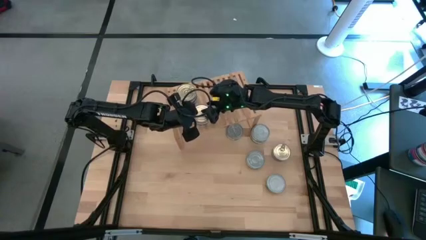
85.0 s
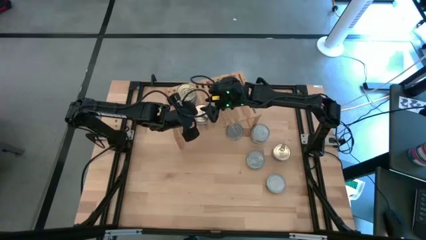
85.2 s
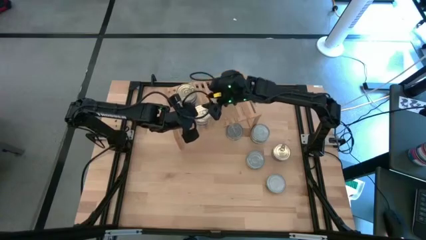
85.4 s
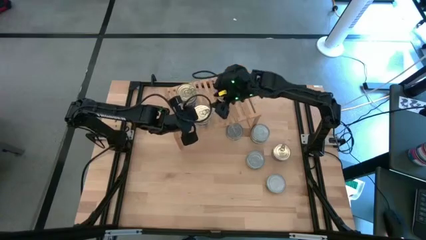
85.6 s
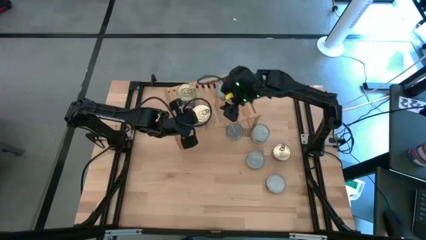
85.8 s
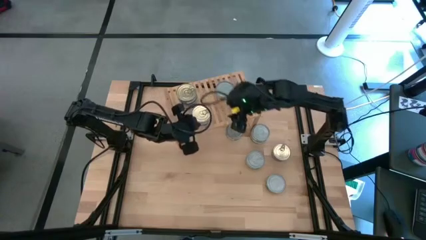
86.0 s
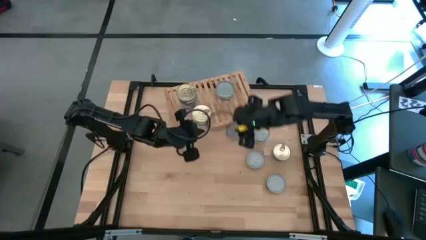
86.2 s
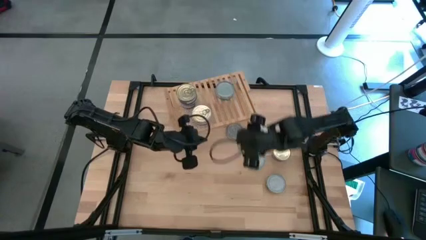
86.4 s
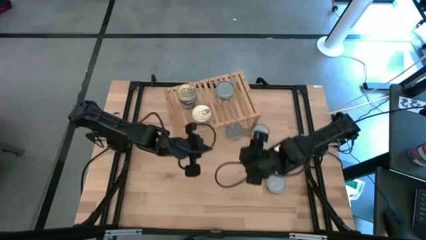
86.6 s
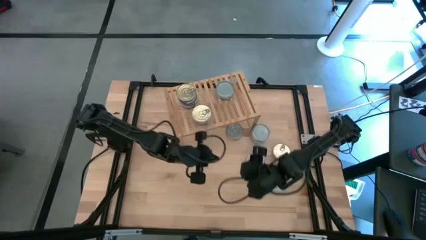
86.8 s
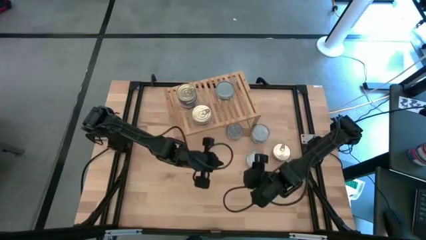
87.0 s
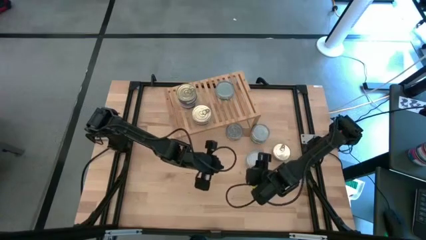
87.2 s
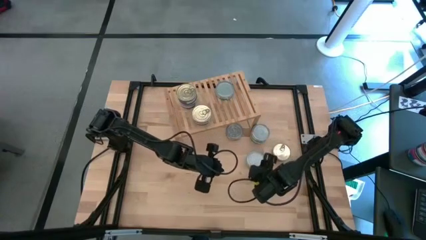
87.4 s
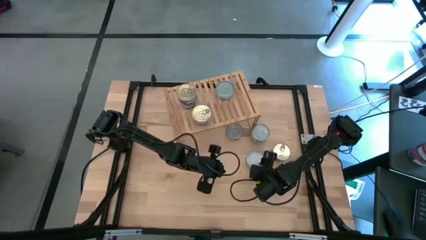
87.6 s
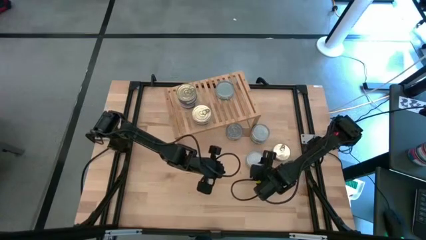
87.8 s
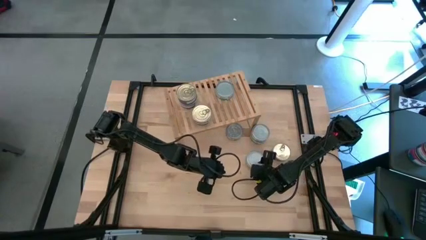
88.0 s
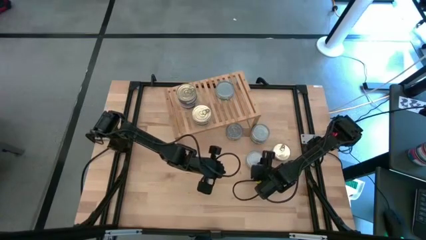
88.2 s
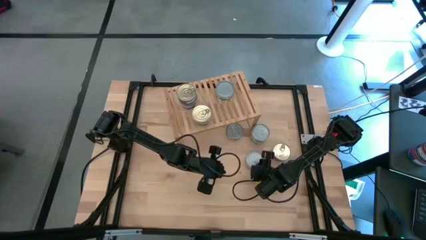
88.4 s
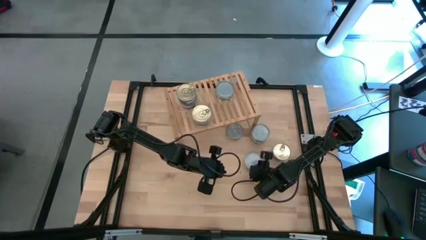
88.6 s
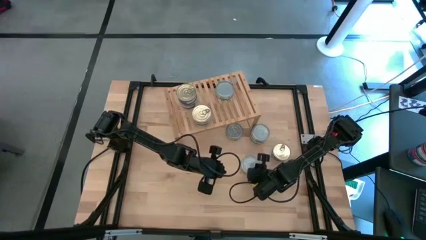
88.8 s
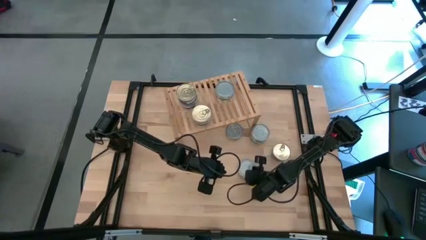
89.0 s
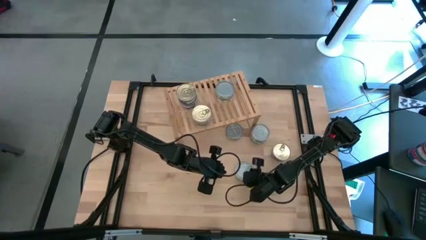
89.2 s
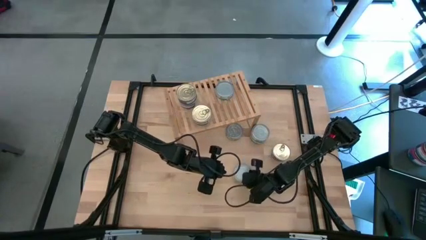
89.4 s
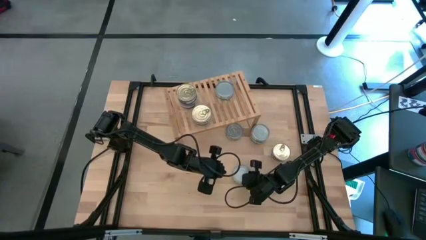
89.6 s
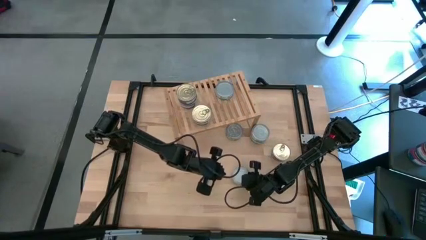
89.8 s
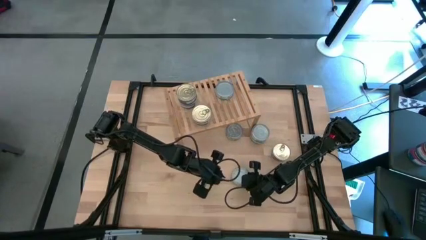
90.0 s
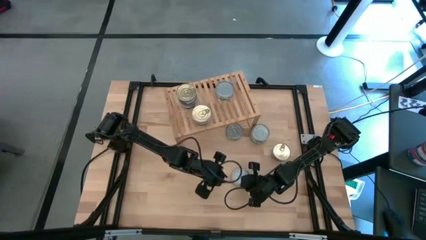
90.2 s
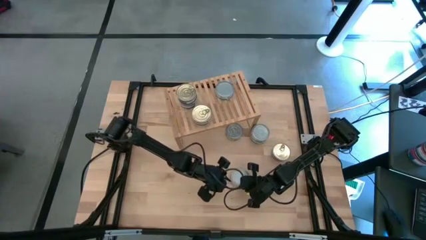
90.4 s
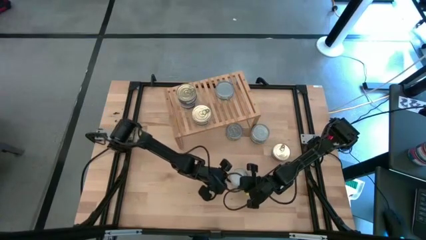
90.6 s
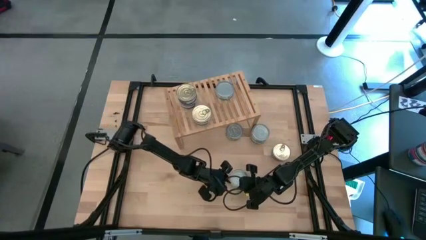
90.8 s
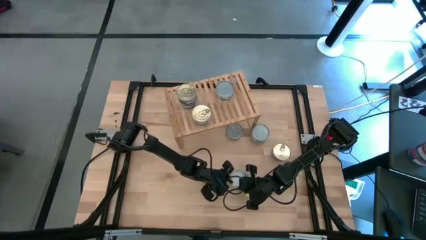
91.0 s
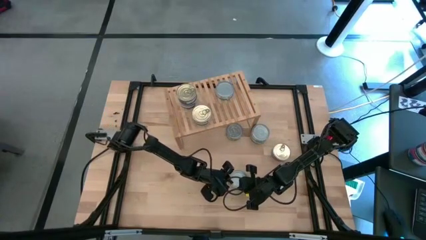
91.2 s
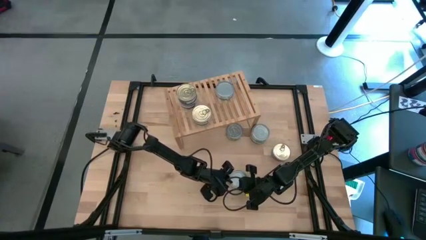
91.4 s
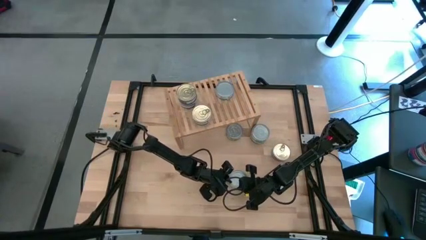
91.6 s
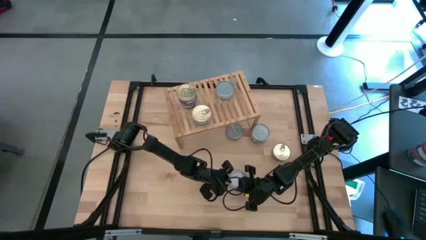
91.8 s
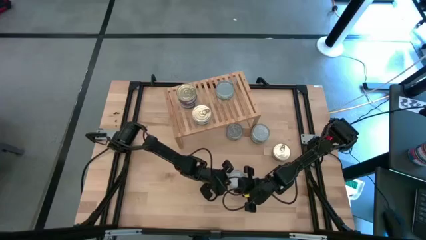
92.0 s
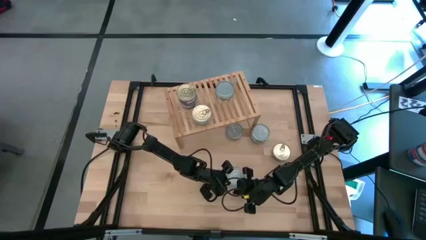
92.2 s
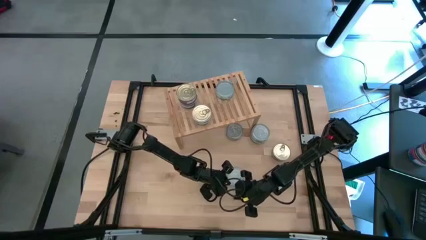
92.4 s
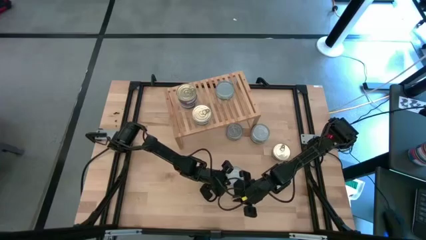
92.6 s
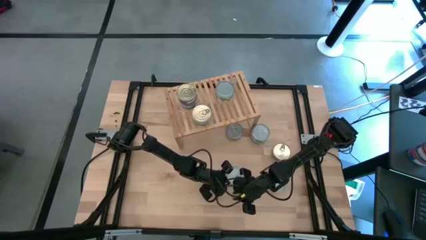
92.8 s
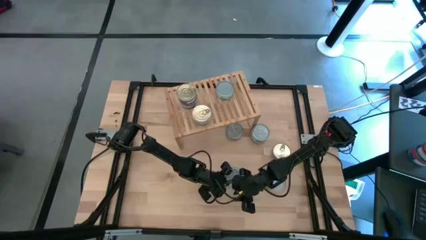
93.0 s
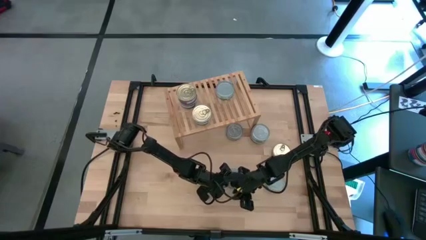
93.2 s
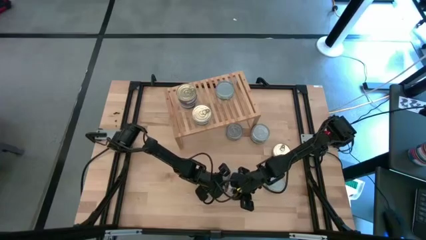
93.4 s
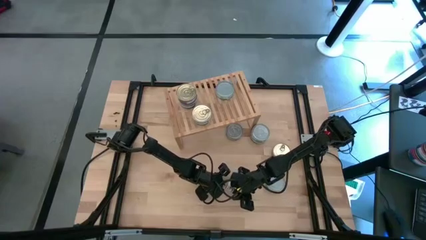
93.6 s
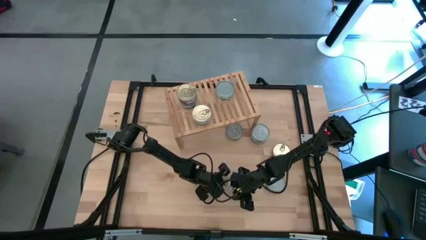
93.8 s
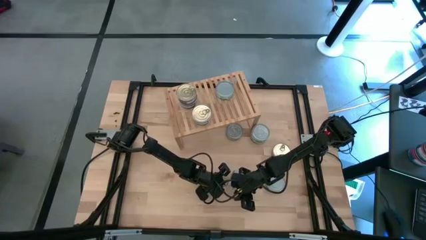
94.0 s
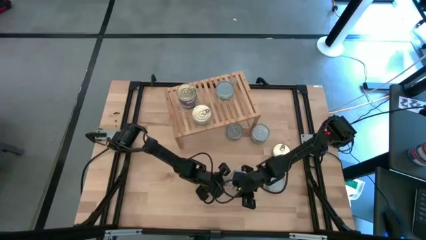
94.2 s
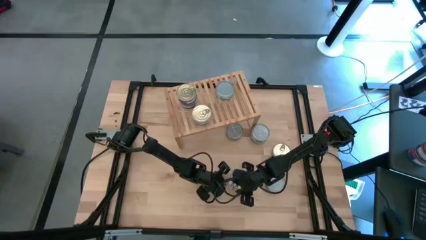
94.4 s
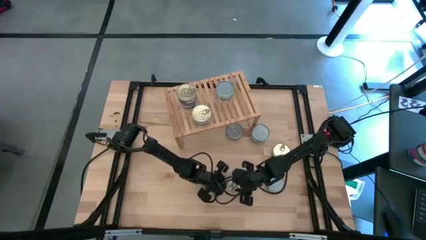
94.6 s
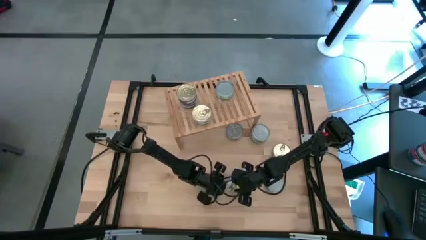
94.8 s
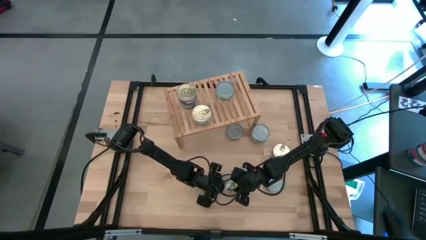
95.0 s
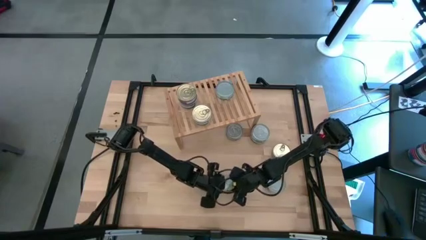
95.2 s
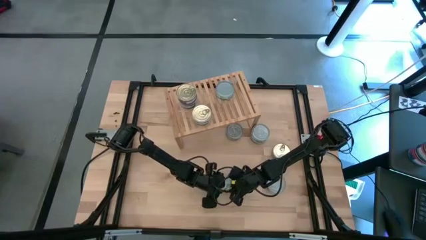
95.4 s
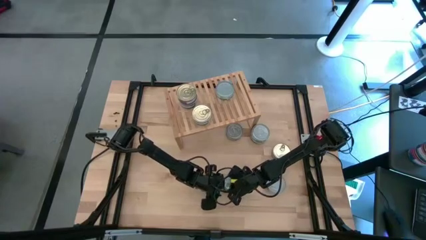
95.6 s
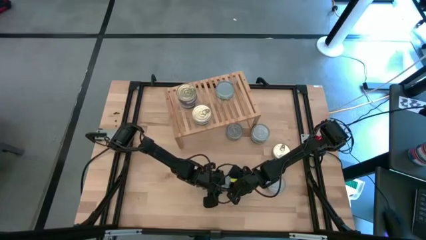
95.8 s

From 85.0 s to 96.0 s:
Task: Stack canned seafood by type on shelf
Stack the green tuna can on top of the green tuna can on the shelf
